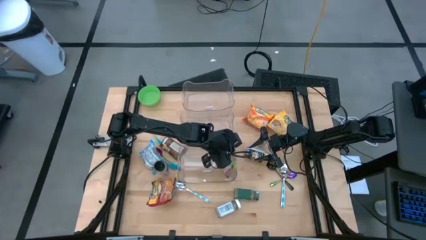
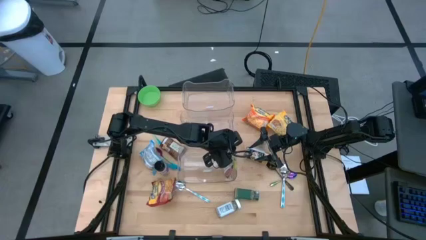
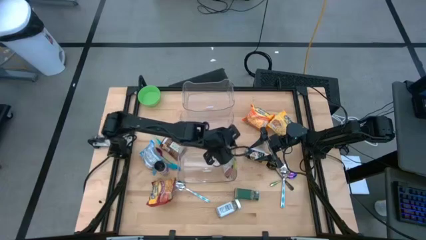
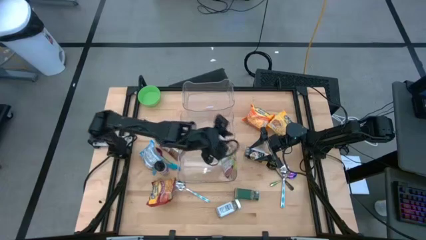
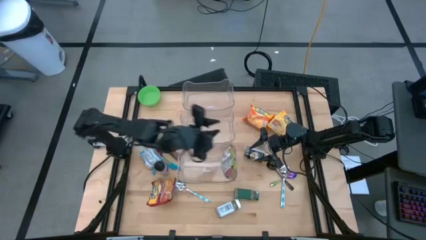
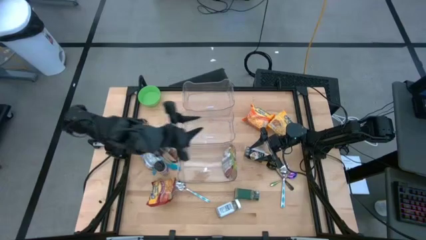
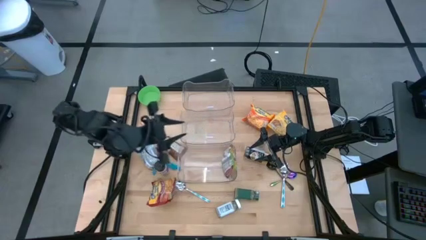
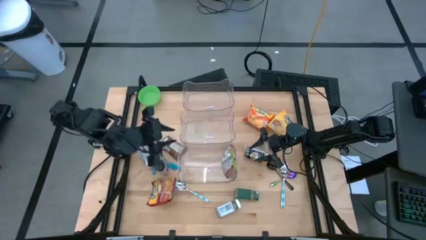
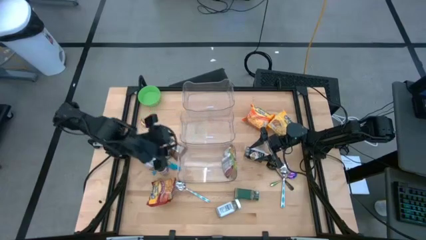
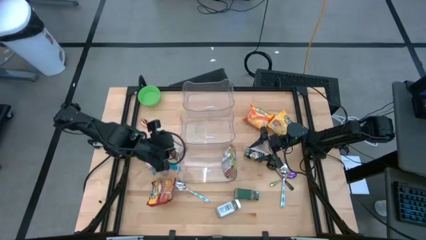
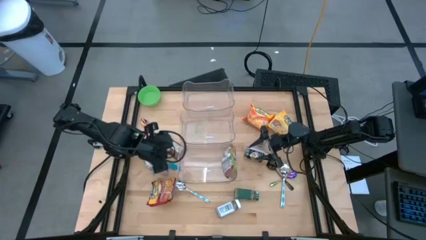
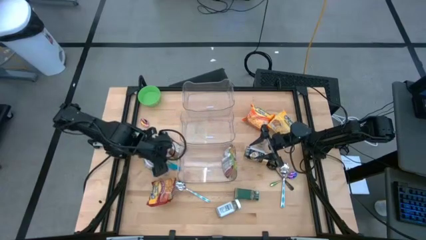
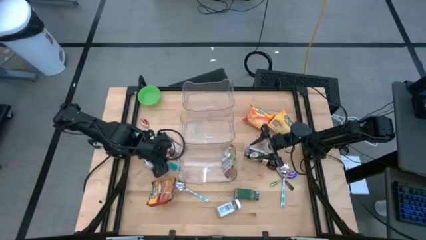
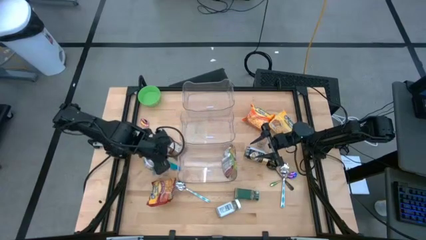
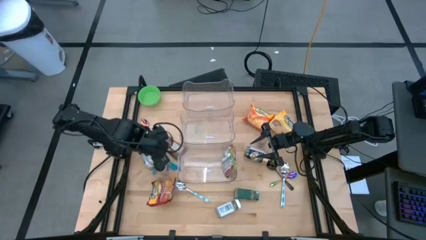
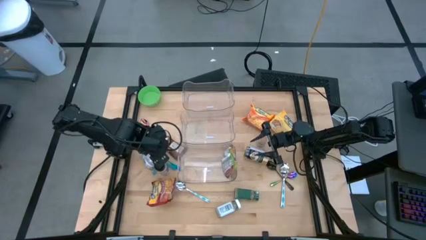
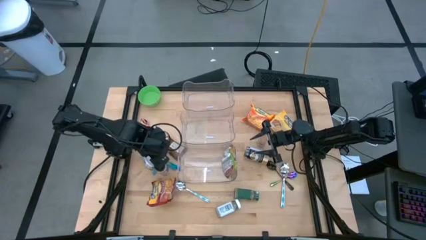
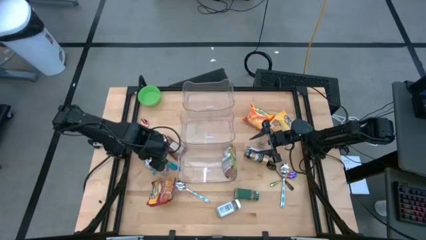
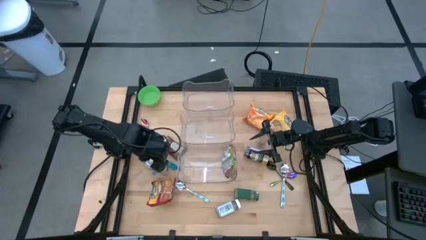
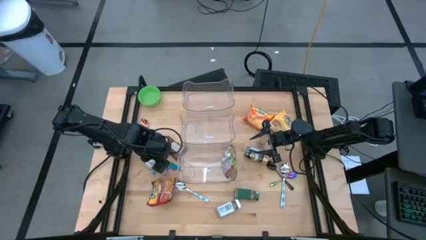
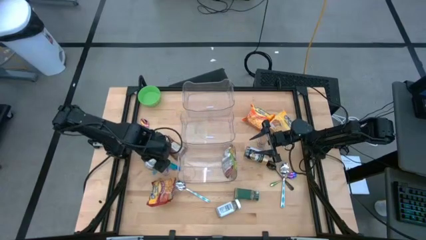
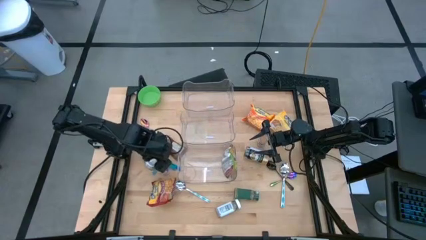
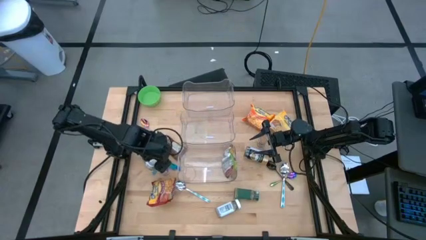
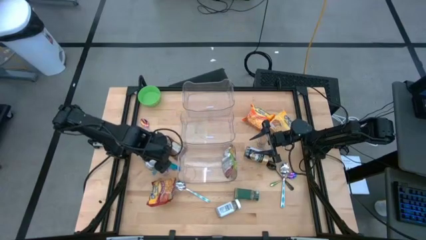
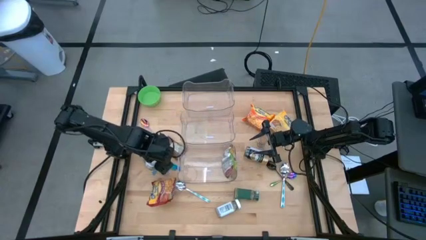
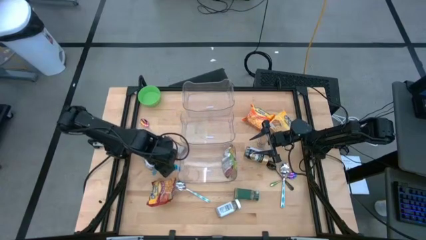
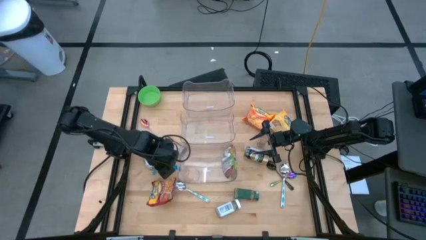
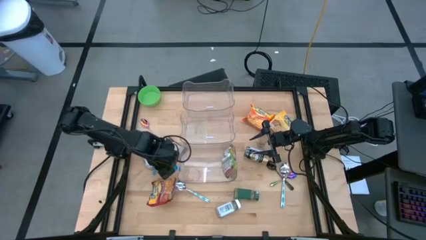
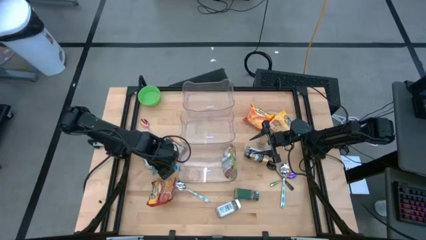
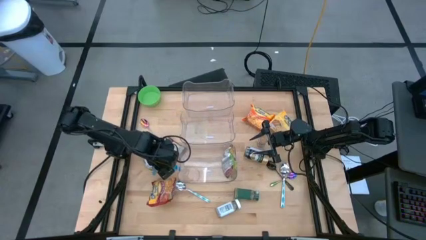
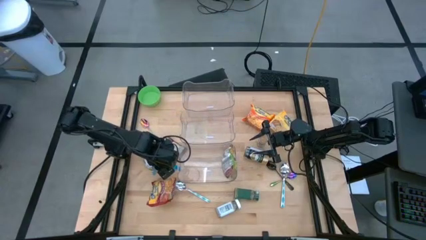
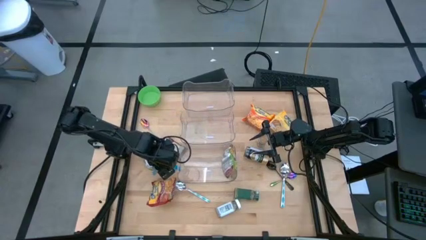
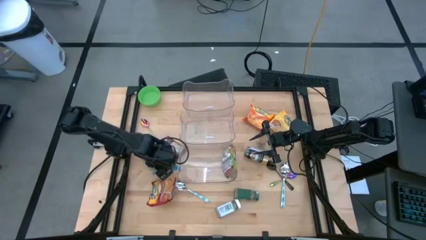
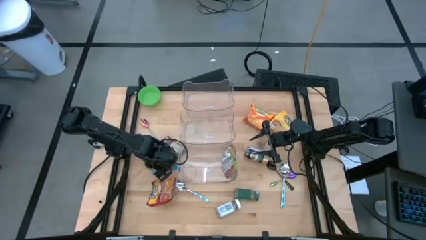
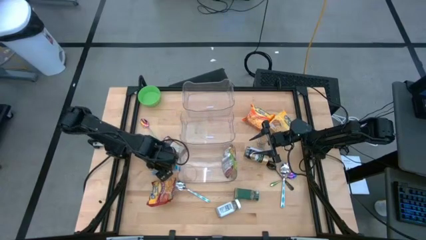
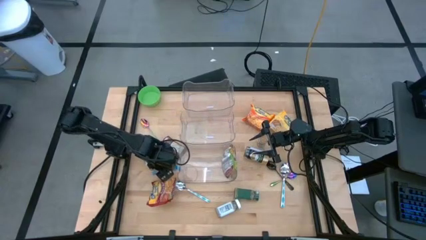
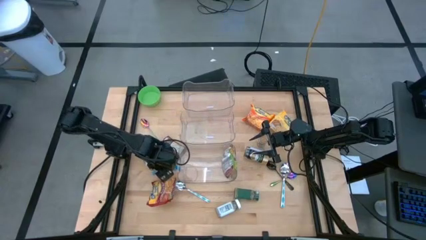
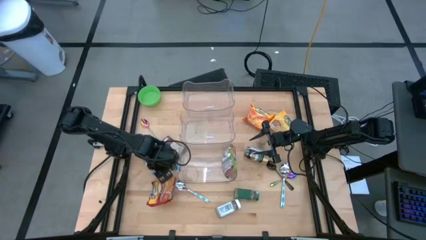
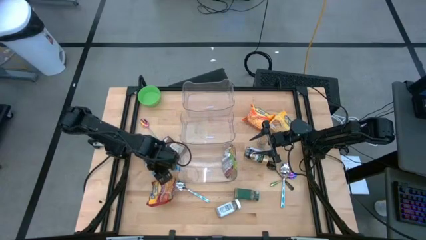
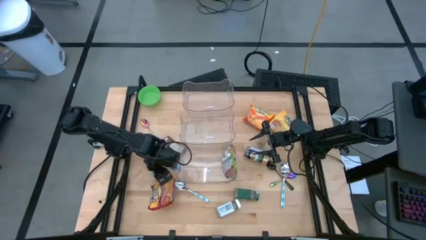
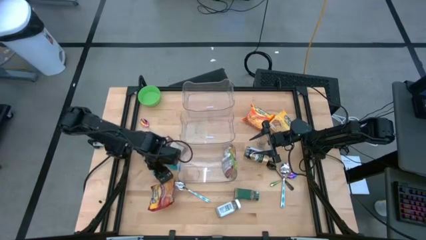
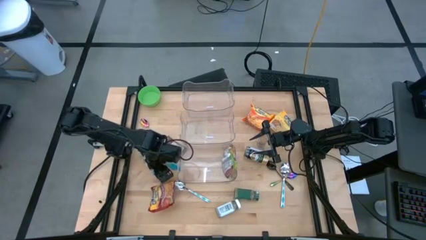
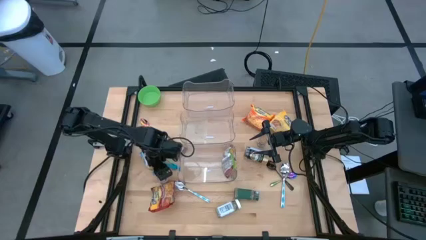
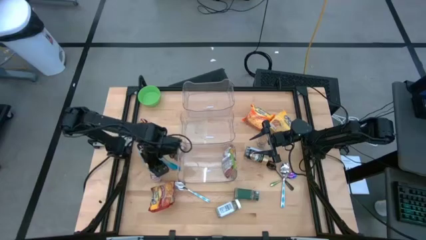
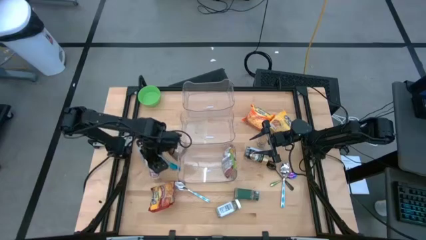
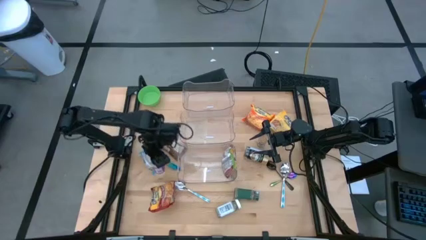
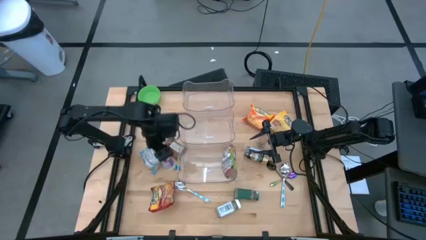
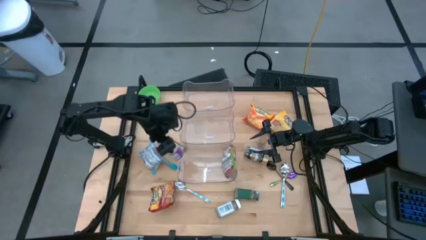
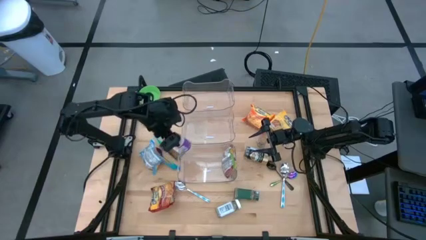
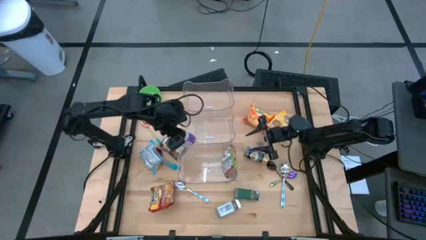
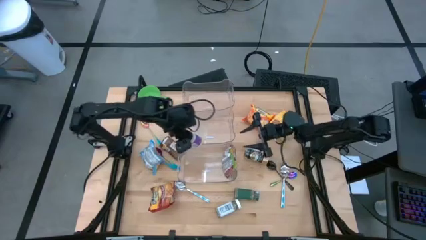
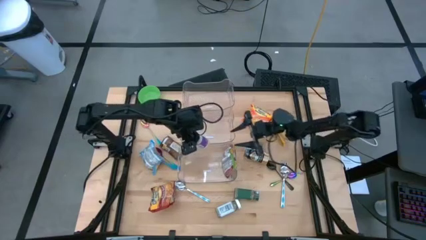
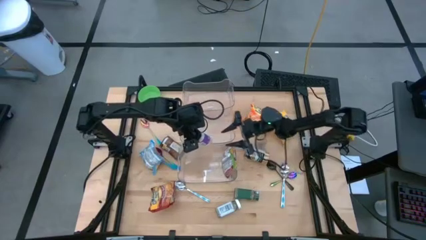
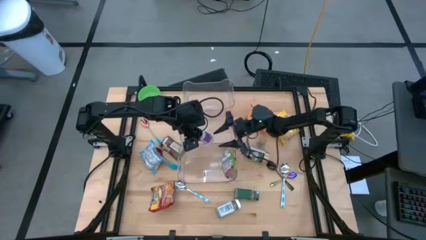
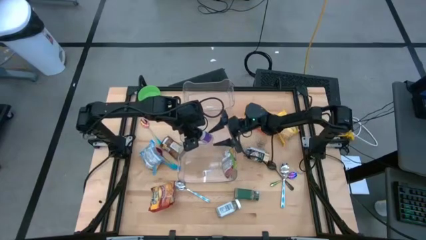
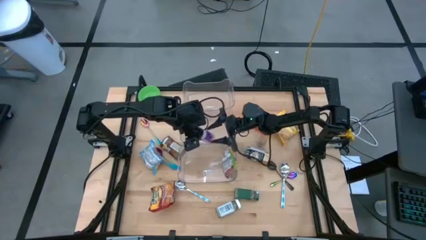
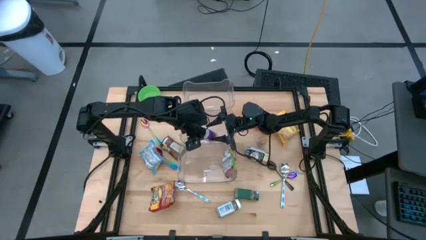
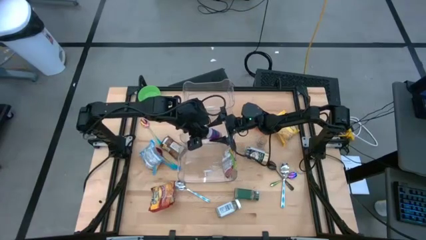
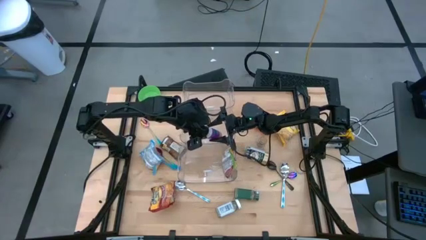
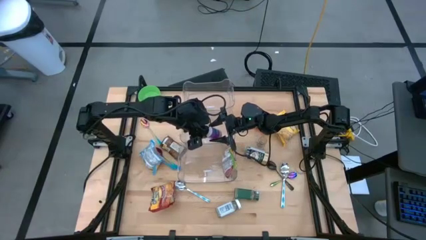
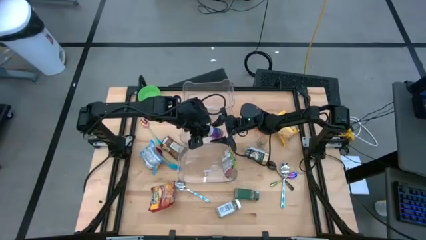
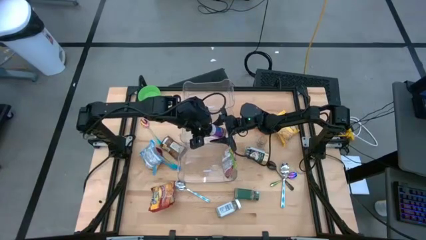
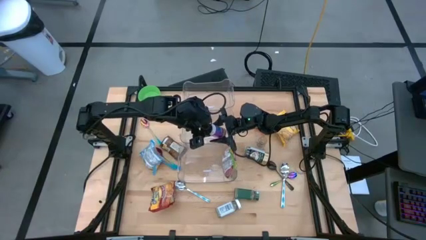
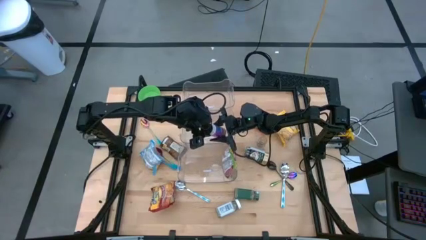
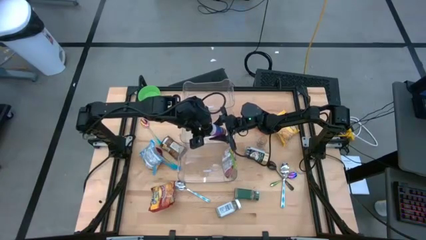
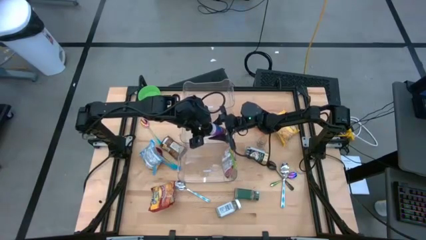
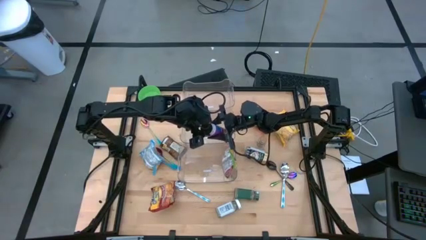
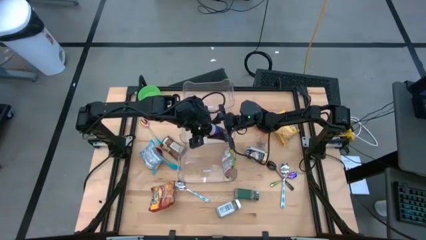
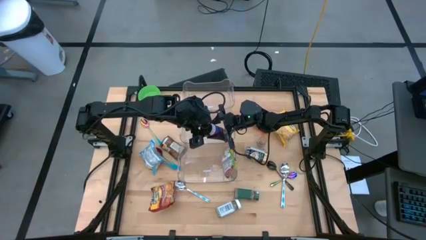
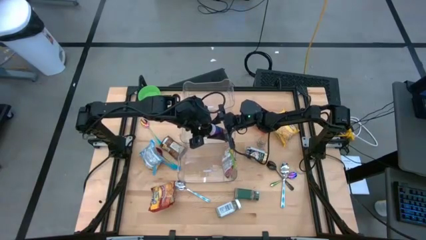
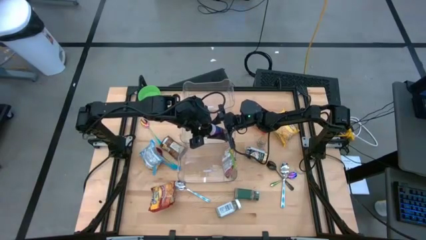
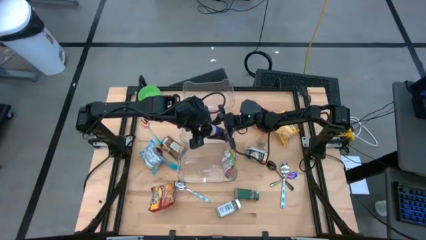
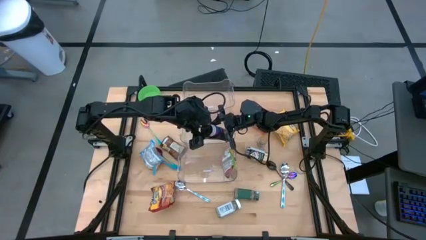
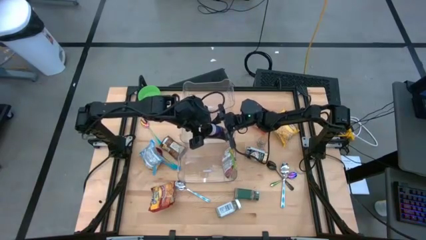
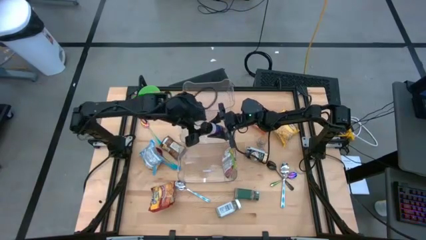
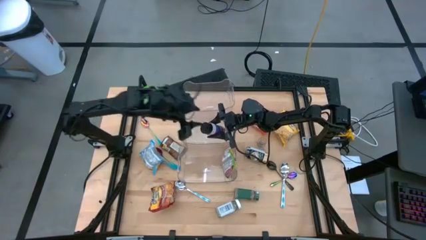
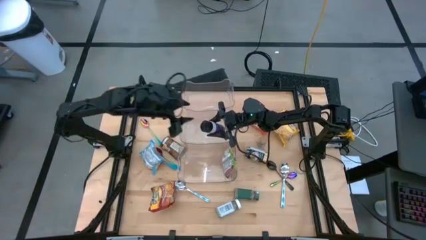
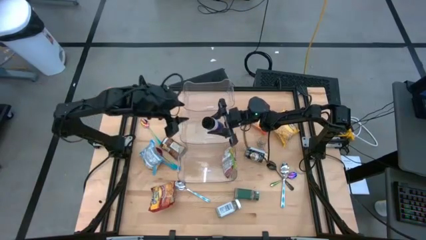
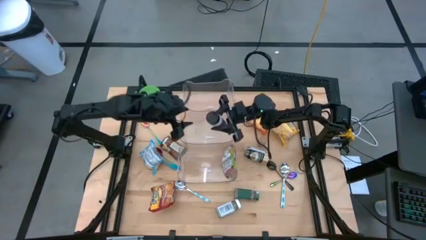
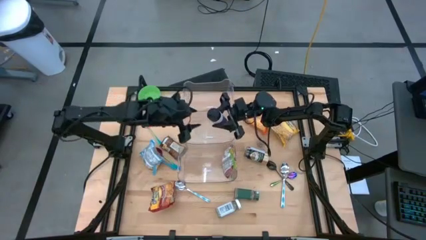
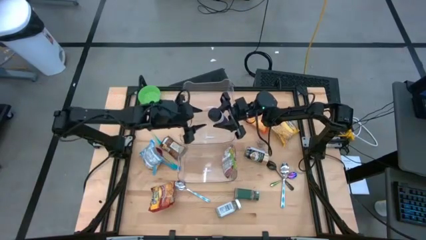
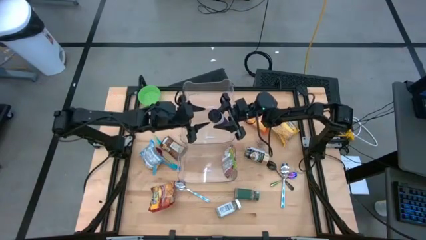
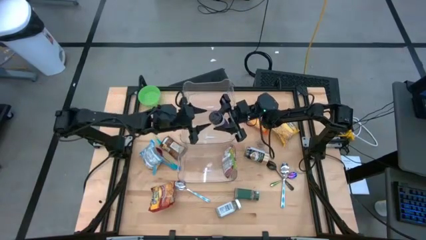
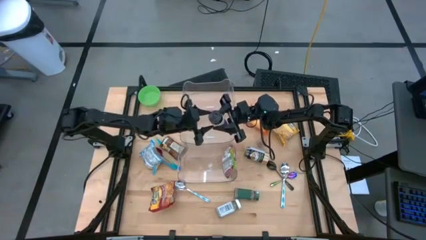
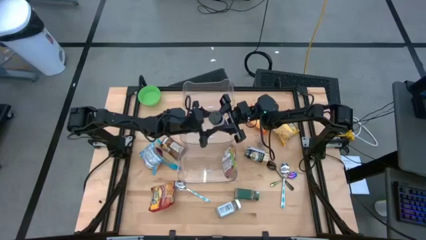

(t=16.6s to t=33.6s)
Task: Pick & Place Food Item
Put the purple seasoning bottle into the middle transparent bin
